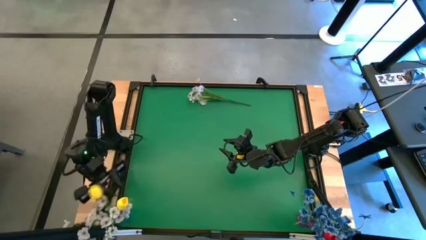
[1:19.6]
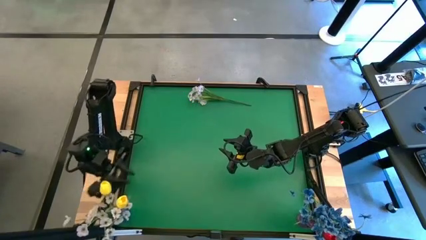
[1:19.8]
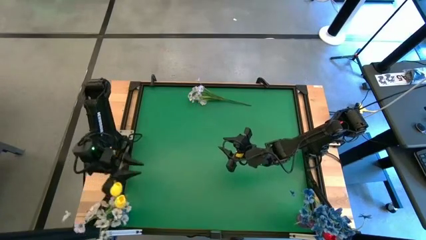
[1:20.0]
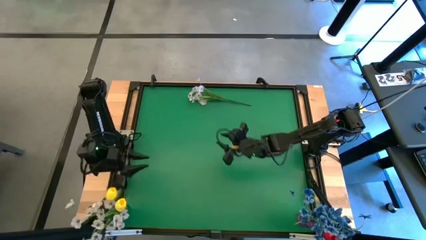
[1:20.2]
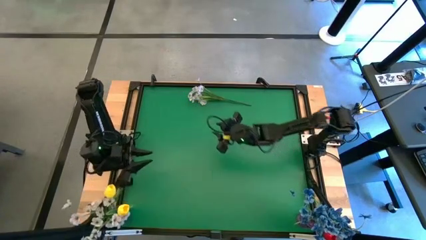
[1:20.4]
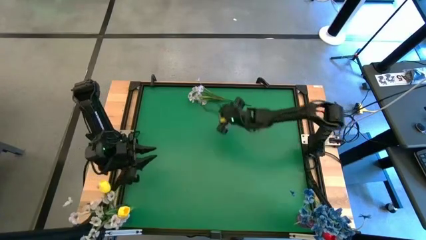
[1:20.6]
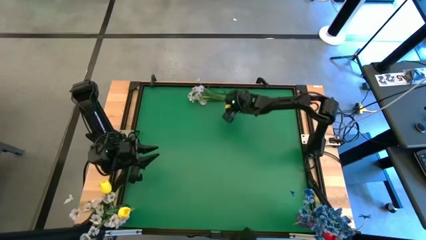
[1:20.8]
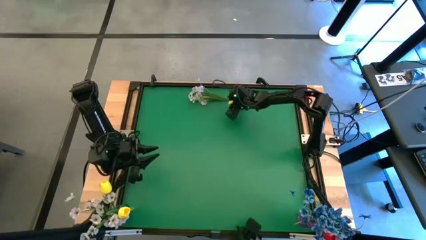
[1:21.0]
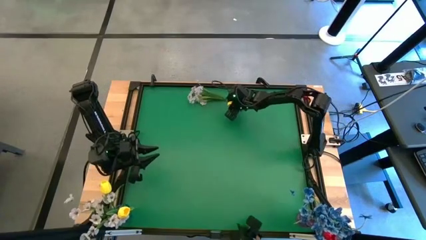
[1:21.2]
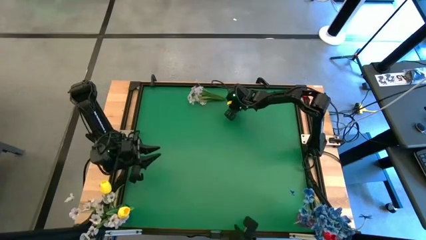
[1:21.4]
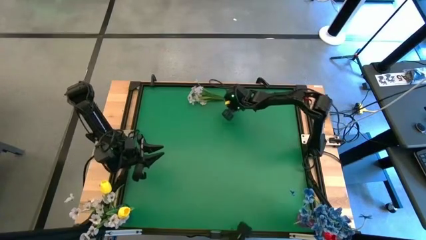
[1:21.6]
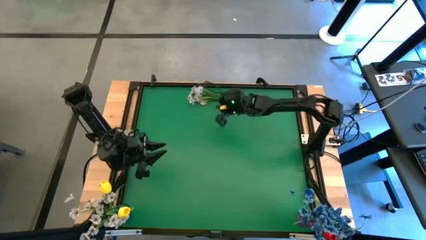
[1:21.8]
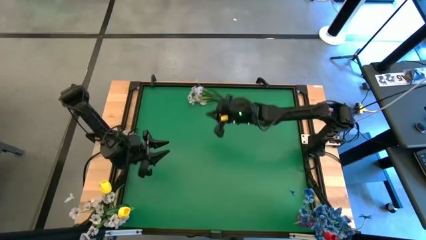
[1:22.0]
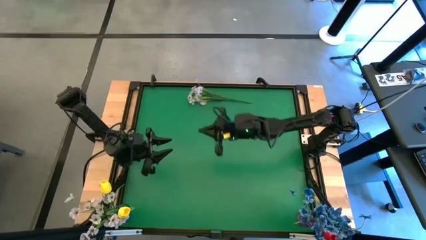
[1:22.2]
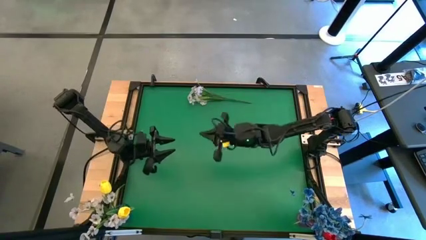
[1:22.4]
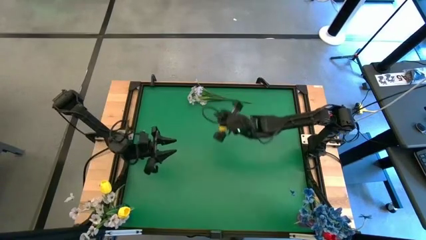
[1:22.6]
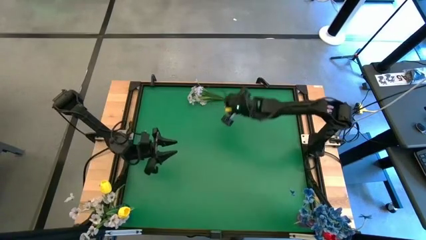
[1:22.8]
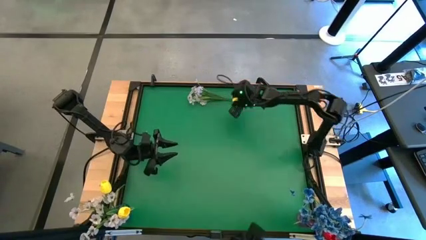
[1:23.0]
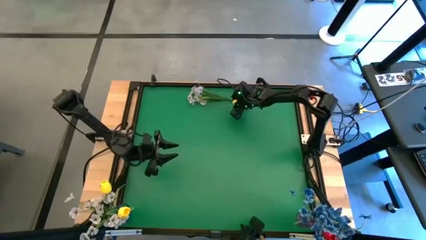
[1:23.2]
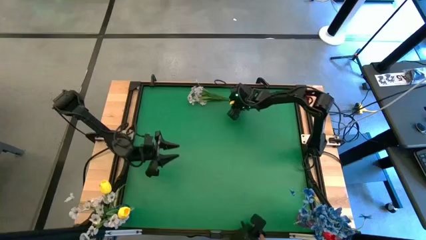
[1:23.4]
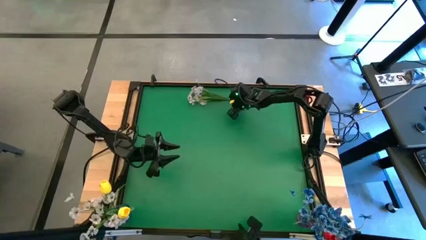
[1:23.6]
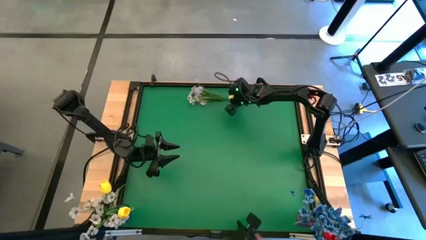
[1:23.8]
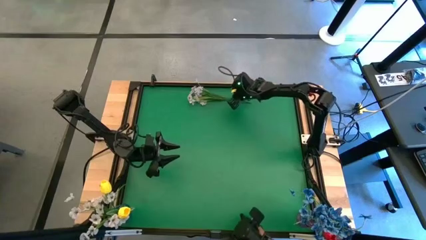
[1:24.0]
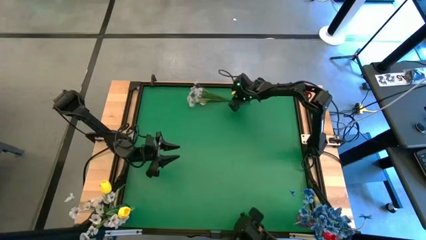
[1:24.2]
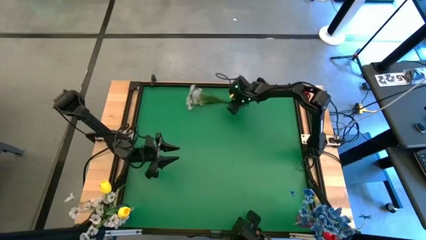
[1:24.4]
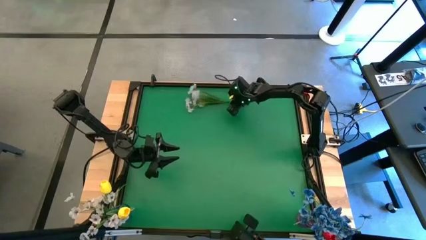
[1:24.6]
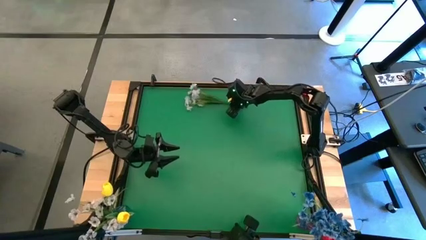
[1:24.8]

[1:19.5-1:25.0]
Task: Sort flowers into vase by color
Put the white flowers into the blue vase

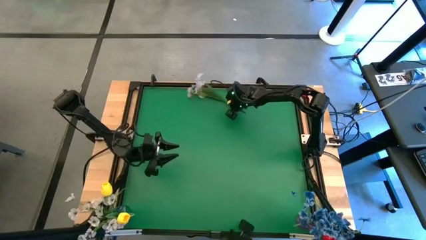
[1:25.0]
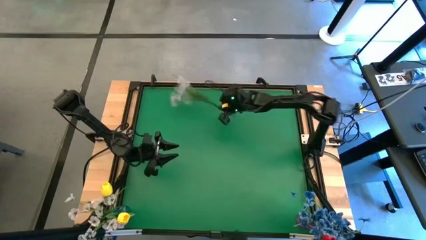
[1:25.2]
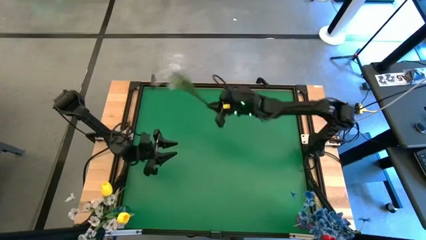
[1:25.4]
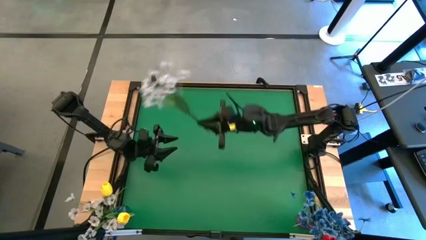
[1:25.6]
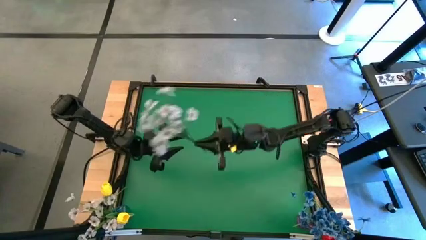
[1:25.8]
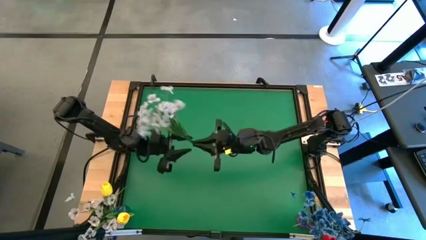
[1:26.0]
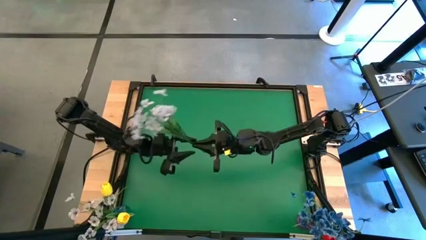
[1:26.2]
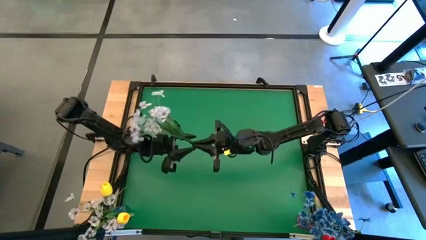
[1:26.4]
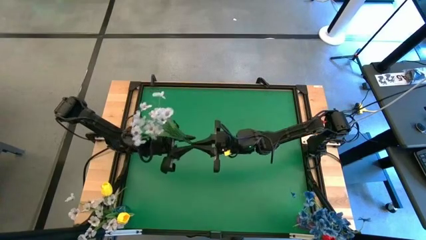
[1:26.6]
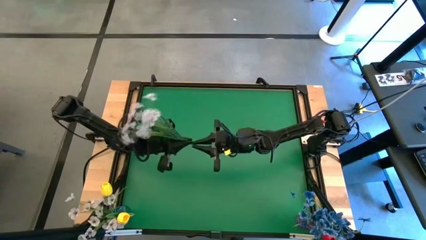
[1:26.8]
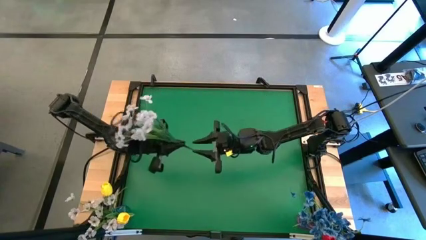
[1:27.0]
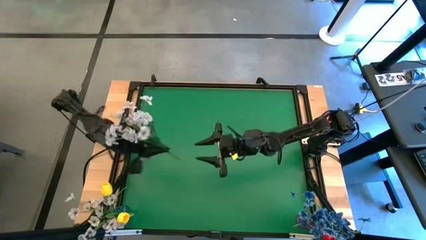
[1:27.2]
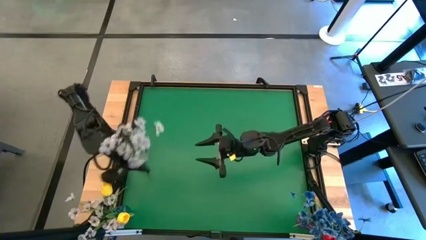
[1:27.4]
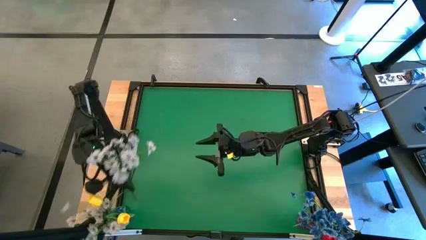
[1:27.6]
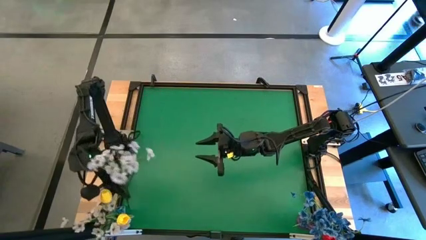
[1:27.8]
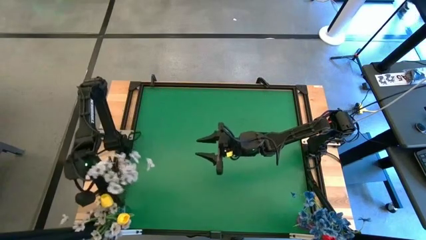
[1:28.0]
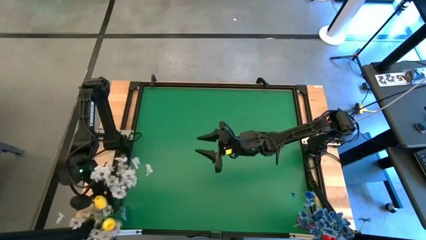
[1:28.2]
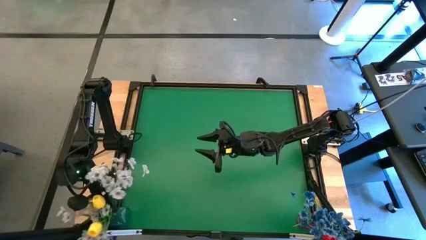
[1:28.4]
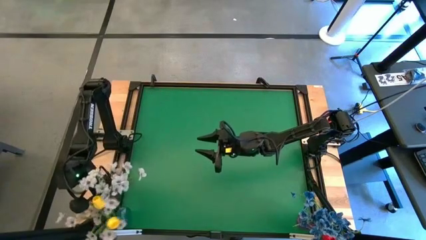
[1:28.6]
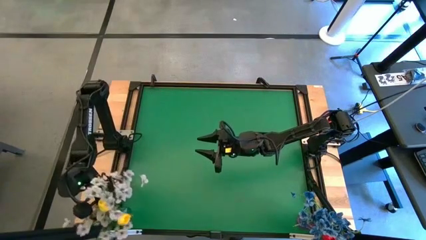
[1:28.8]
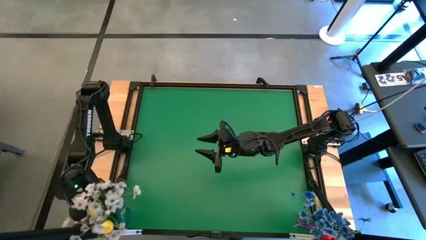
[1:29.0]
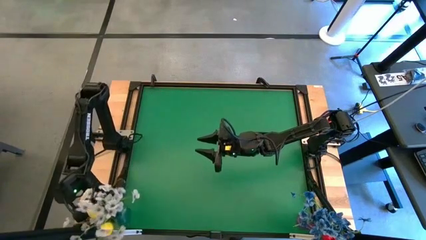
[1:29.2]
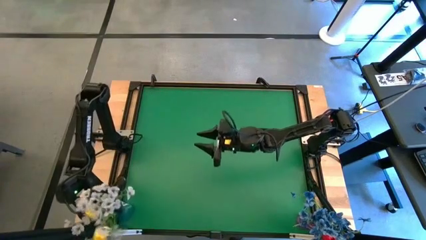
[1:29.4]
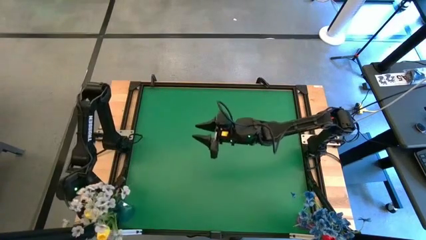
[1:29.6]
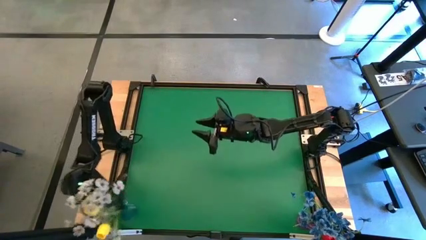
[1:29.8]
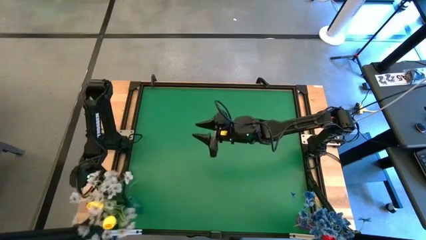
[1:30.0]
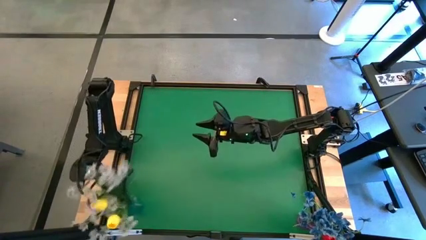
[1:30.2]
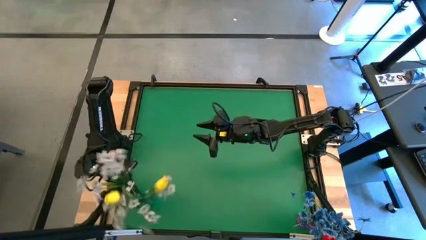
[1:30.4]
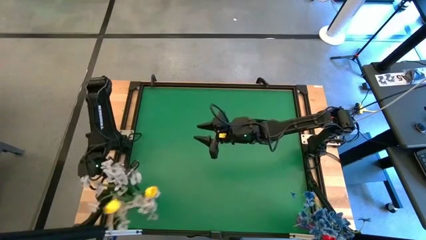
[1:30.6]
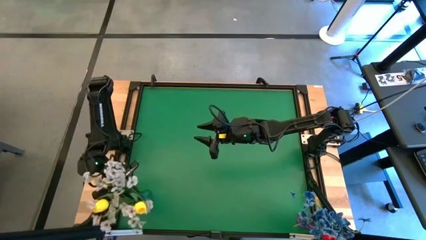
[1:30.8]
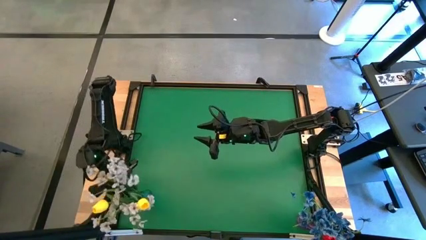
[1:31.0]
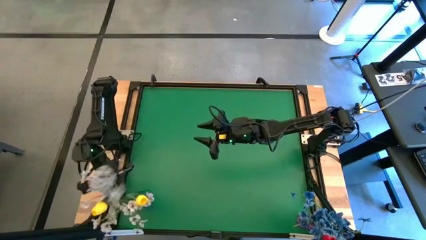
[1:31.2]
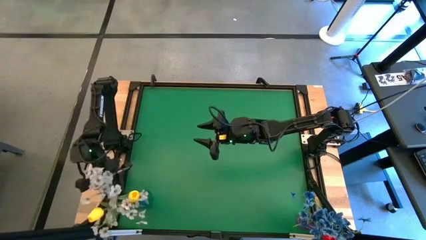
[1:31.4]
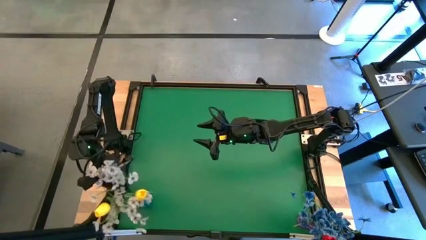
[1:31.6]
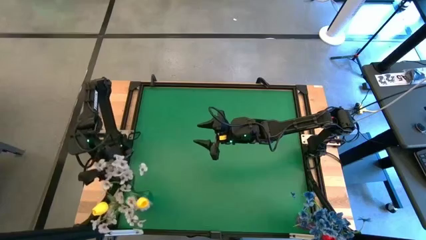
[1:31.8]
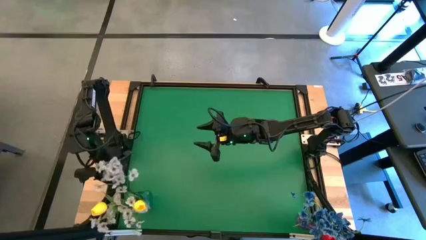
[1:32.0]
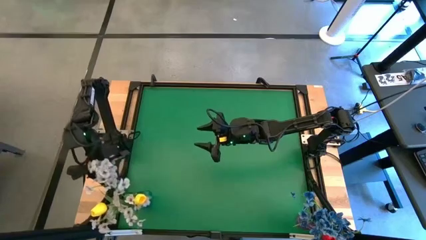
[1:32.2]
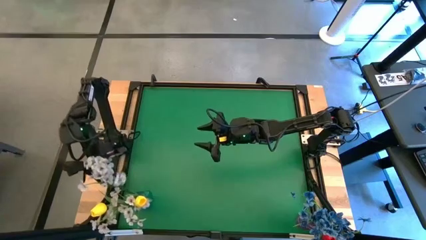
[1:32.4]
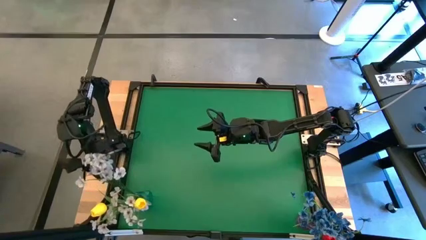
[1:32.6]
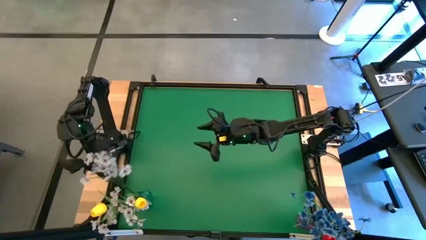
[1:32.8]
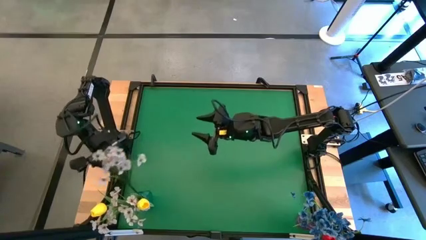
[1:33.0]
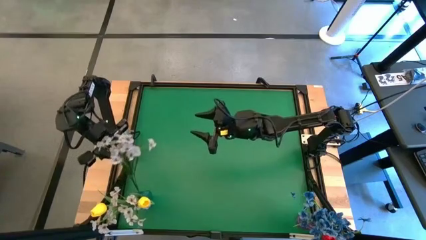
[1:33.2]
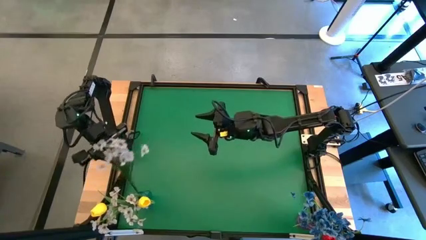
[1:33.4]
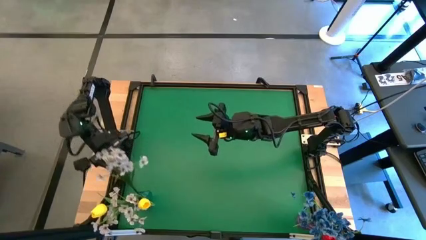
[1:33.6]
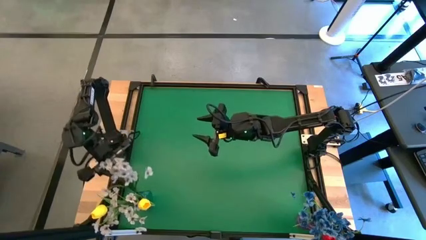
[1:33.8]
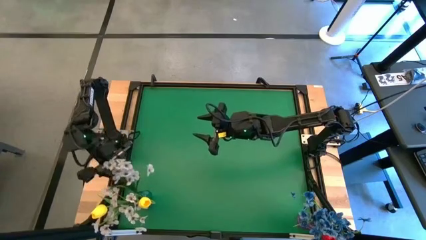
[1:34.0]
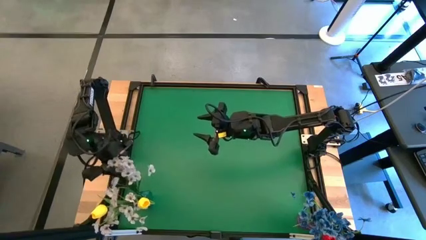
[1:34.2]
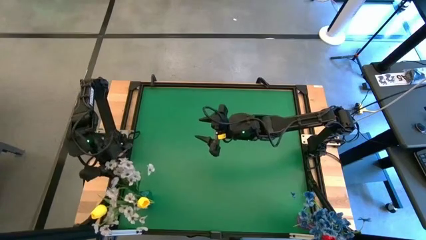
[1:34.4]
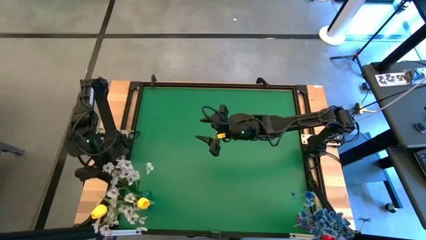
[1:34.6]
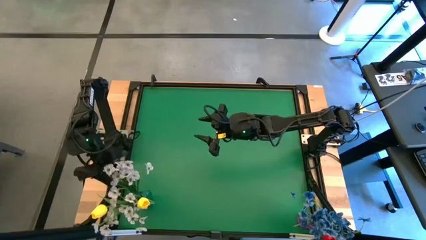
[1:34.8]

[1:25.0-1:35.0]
Put the white flowers into the blue vase

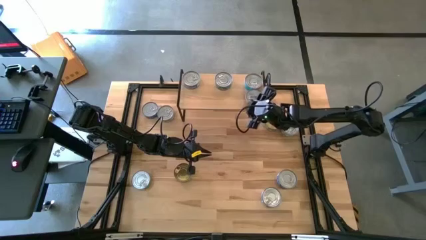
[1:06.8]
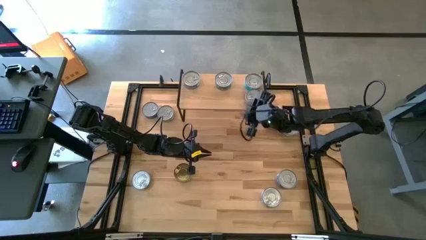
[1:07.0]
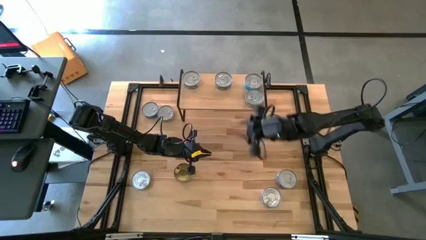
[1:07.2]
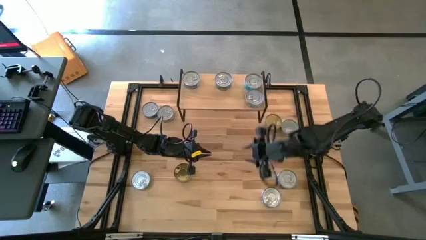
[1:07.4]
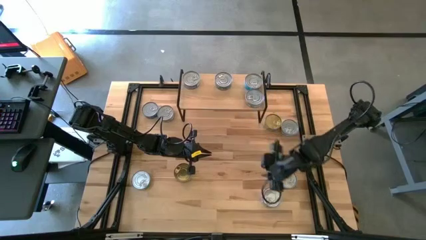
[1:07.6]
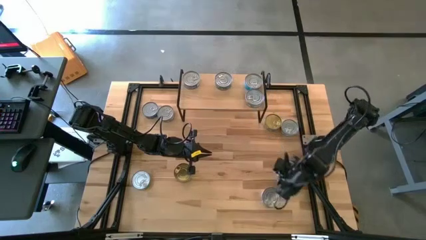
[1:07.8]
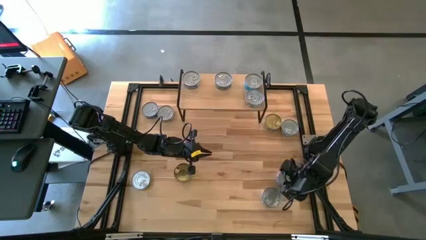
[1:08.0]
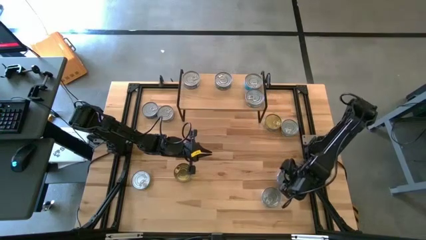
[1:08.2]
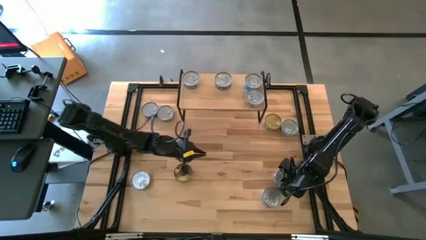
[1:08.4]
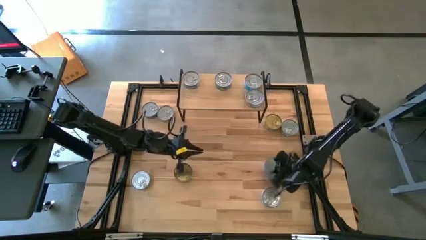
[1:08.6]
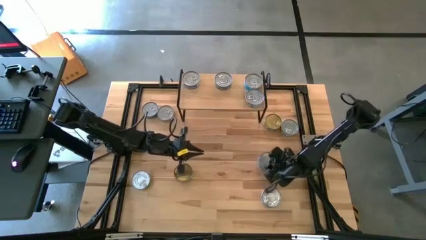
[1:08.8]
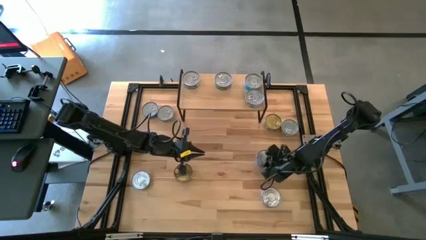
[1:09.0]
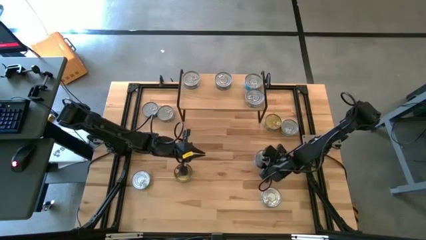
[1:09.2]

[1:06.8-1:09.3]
Task: Stack canned seafood by type on shelf
Adjust the blue tuna can on the table
